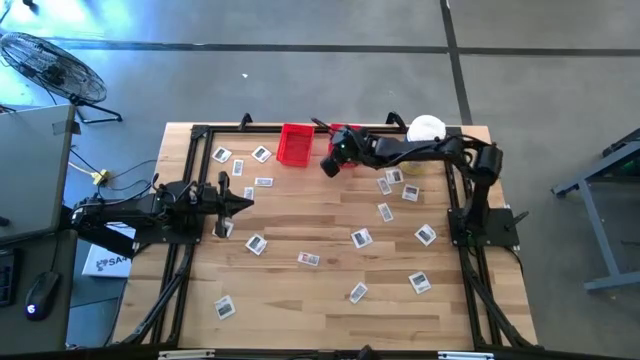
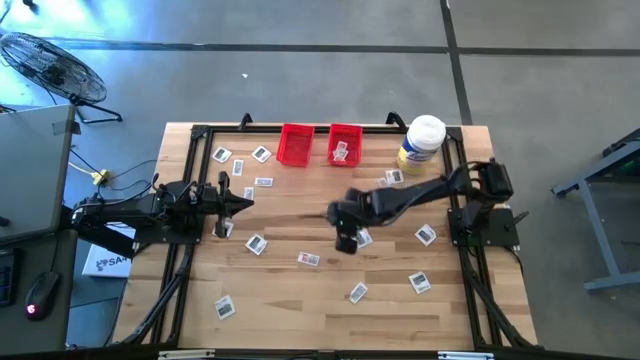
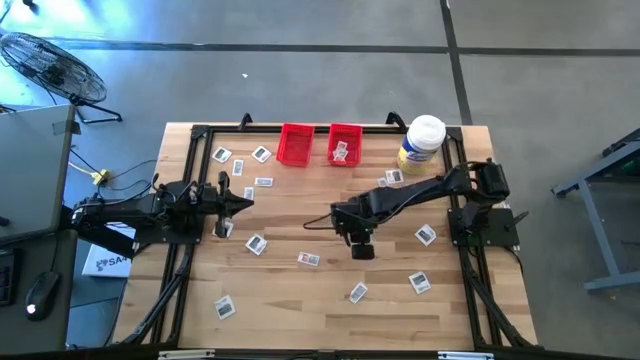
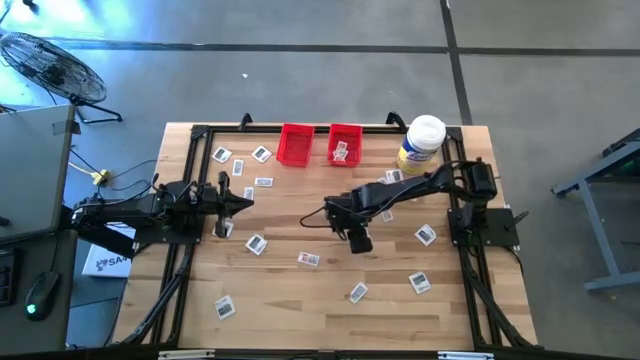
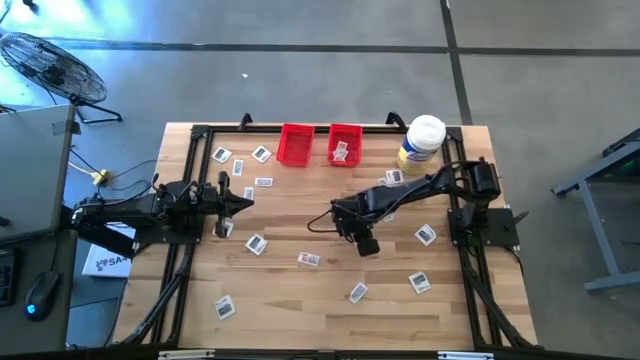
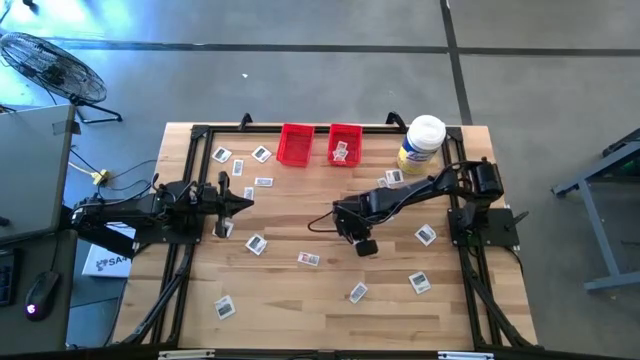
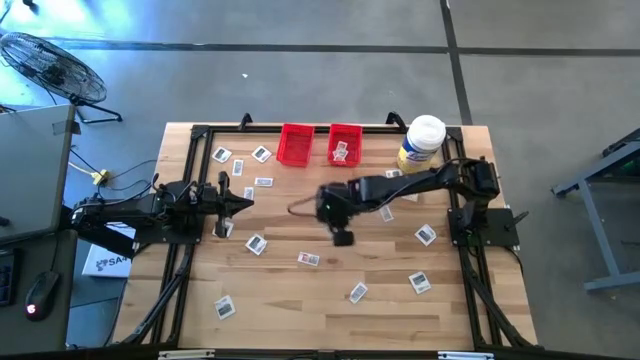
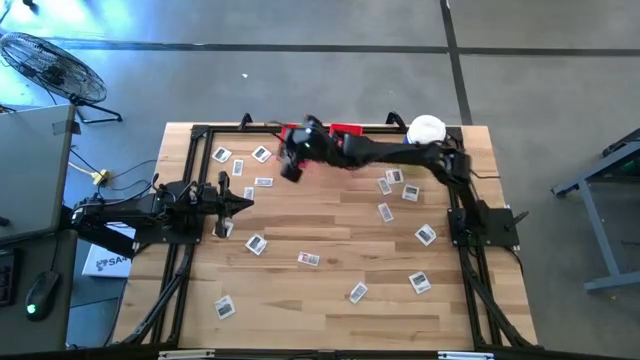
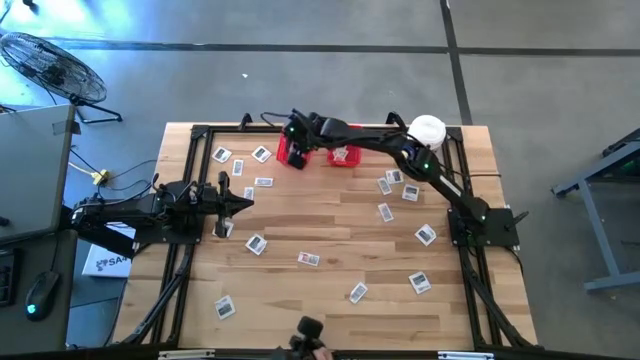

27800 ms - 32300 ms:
Task: Pick & Place First Aid Supplies
Put the towelette pack into the left red bin

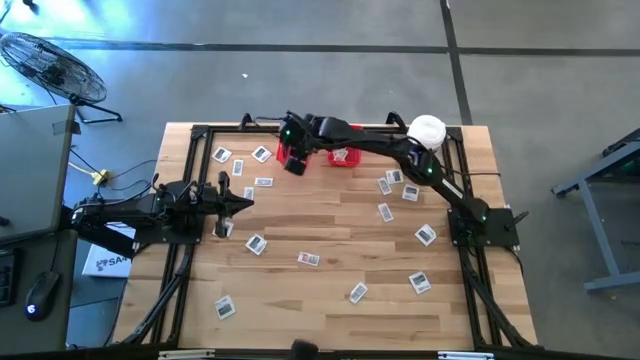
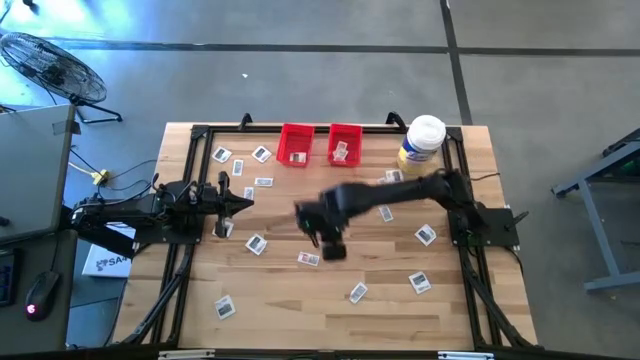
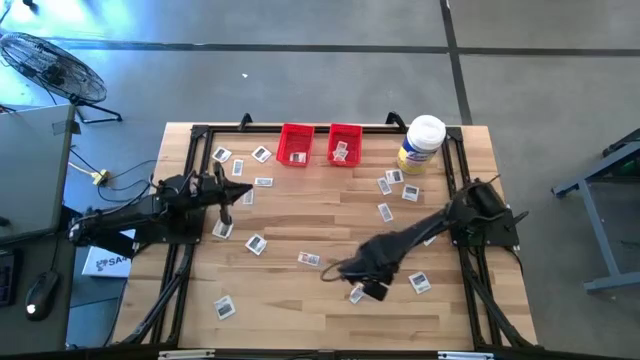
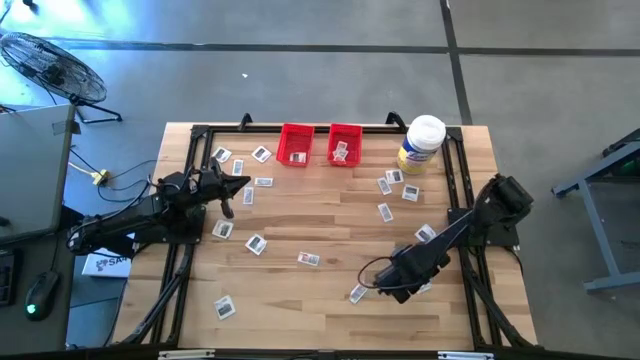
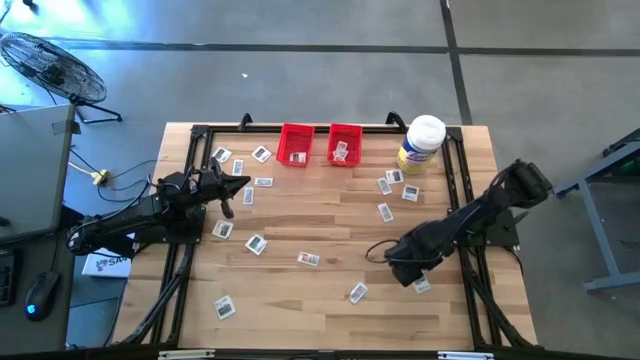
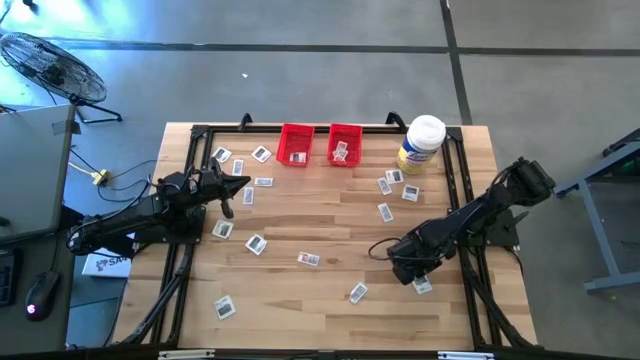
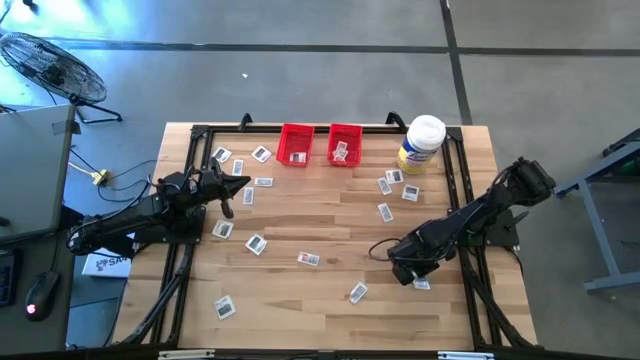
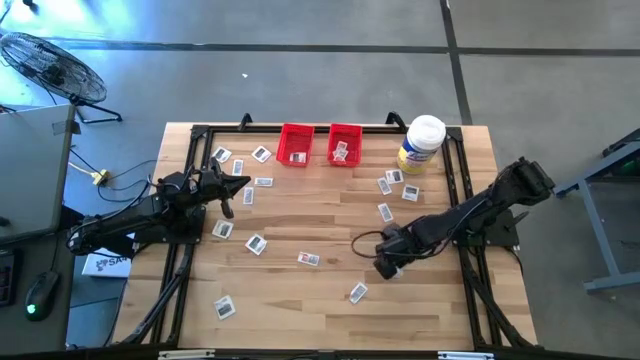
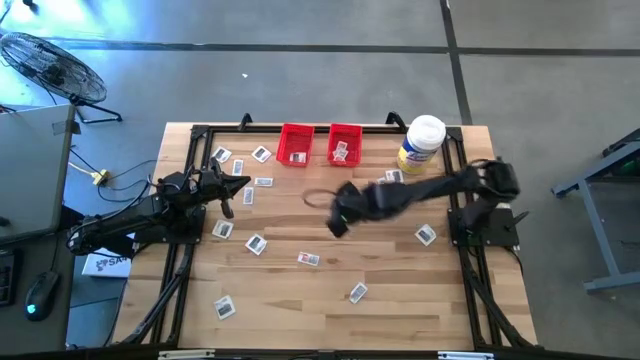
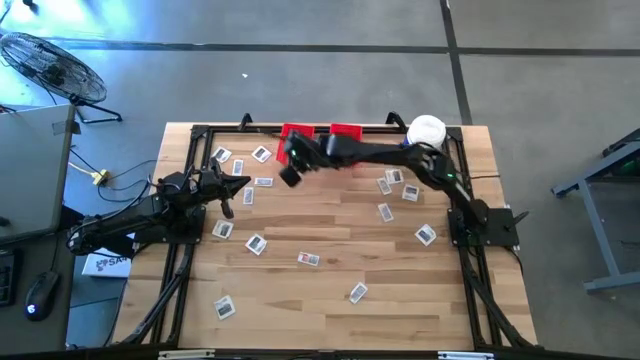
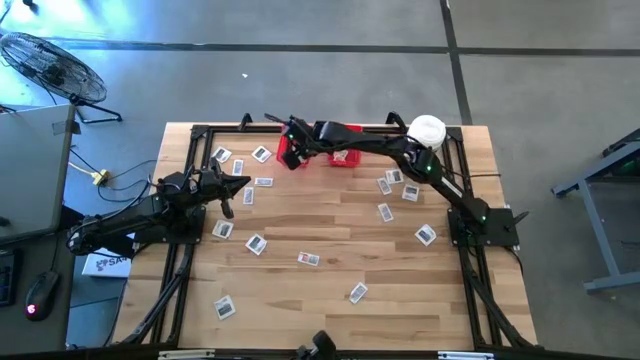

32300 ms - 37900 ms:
Put the towelette pack into the left red bin

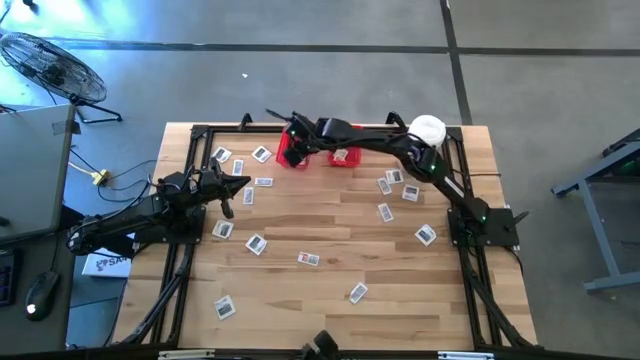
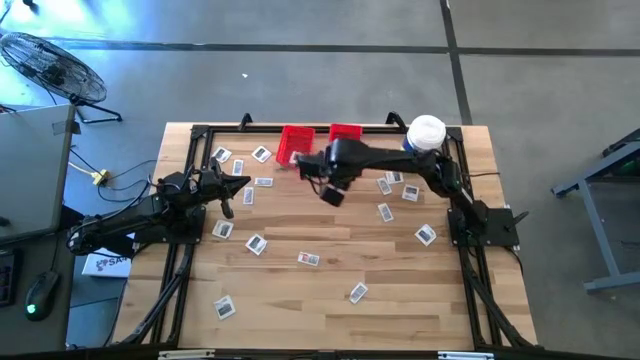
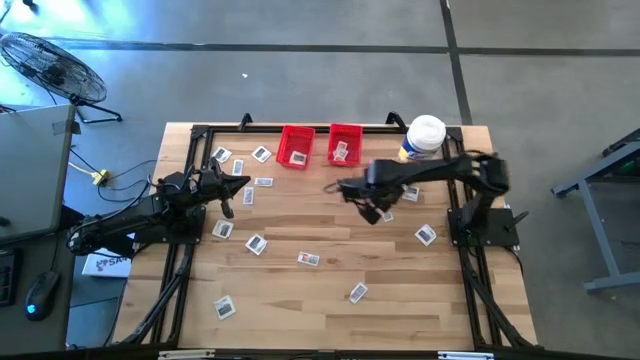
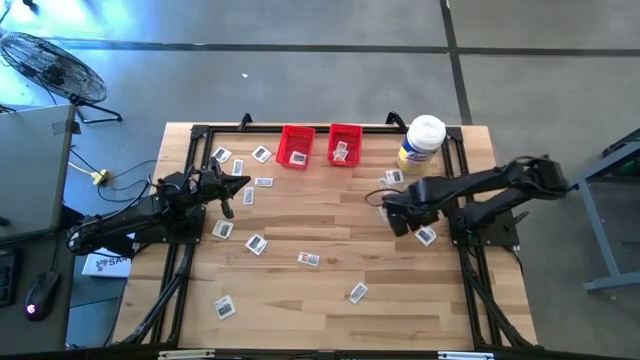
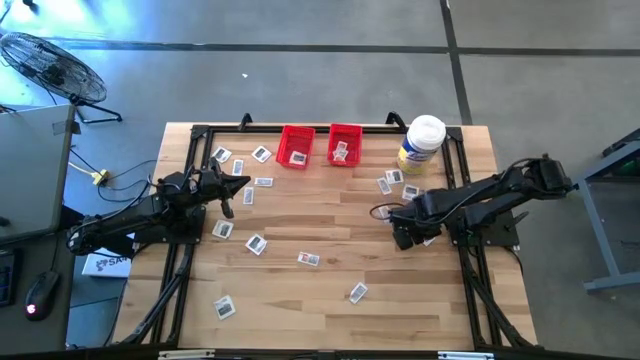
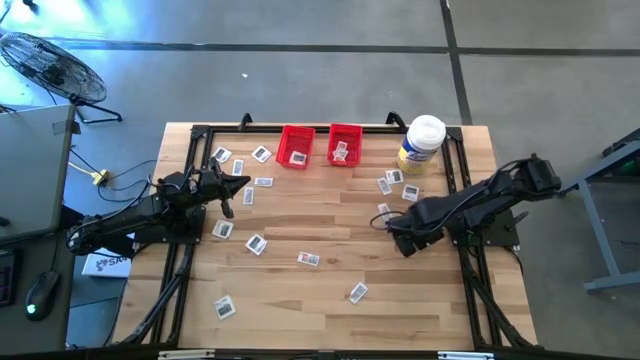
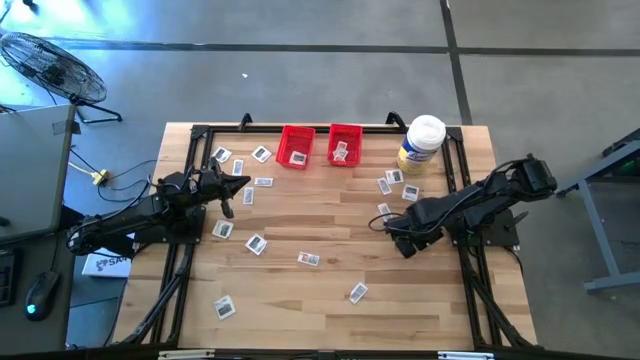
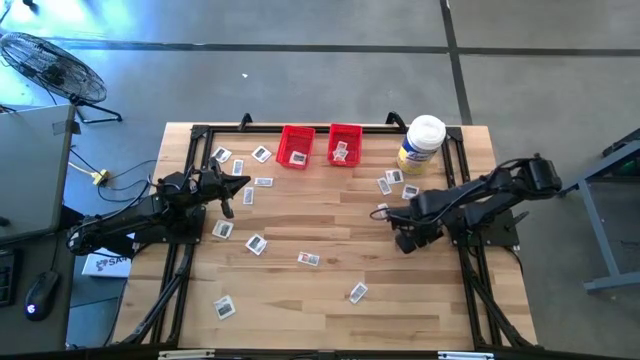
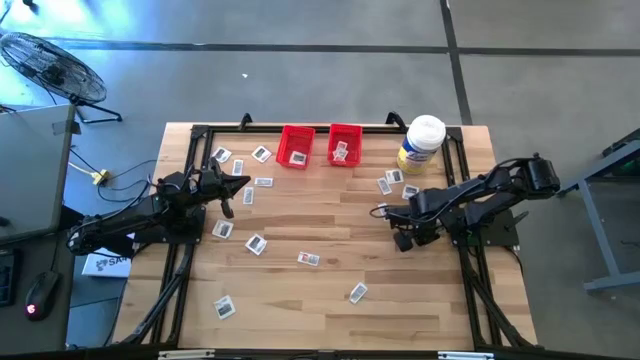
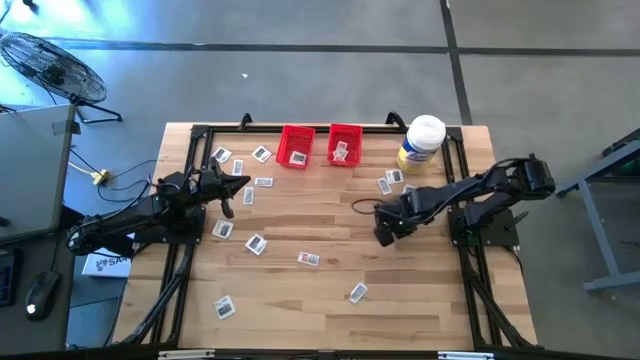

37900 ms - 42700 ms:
Put the towelette pack into the left red bin

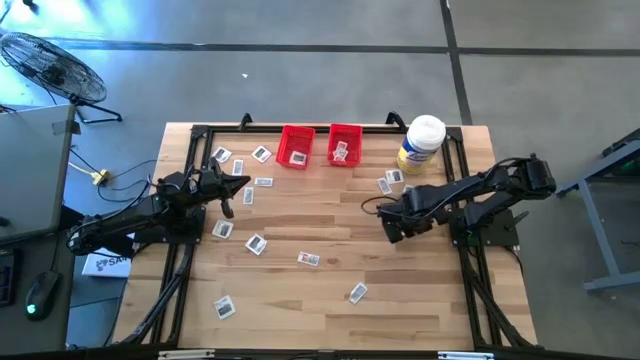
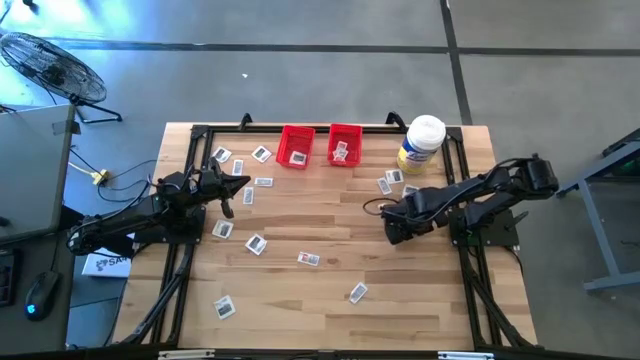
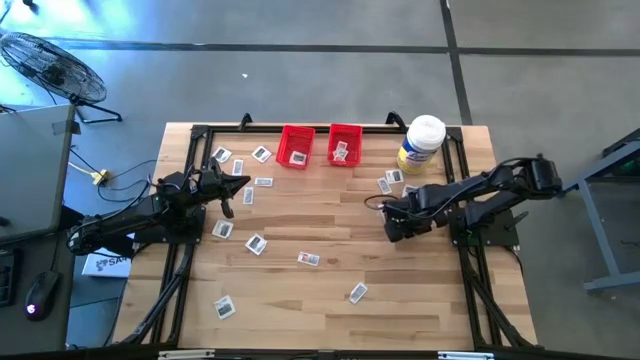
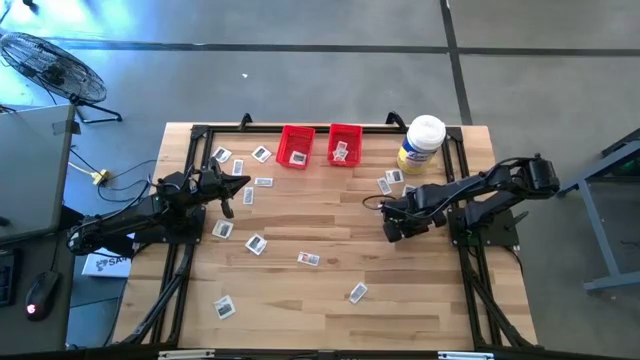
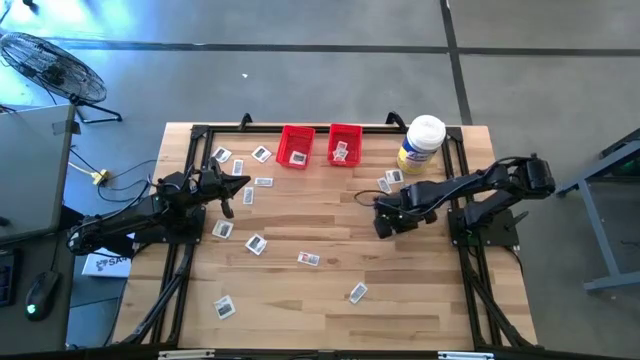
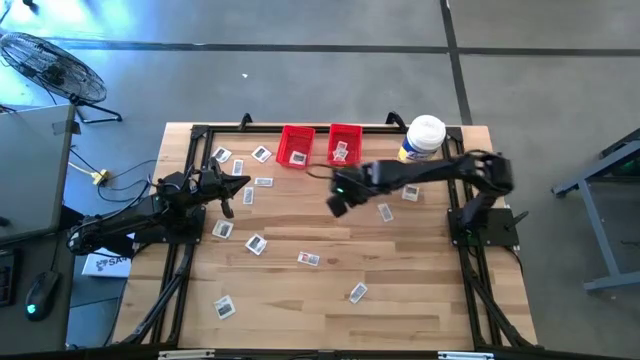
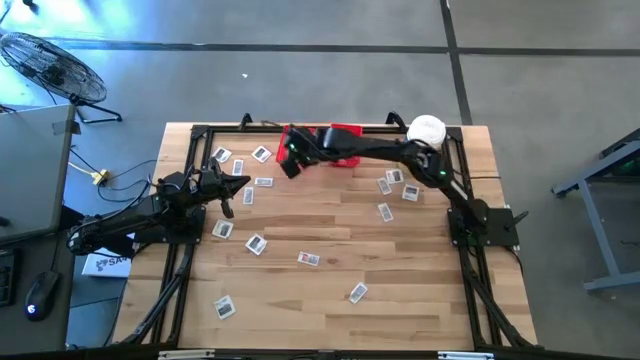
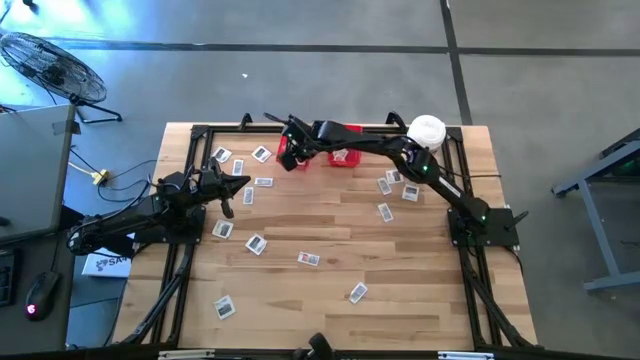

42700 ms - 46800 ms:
Put the towelette pack into the left red bin

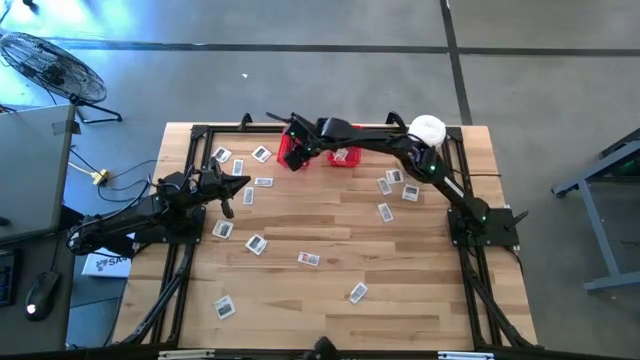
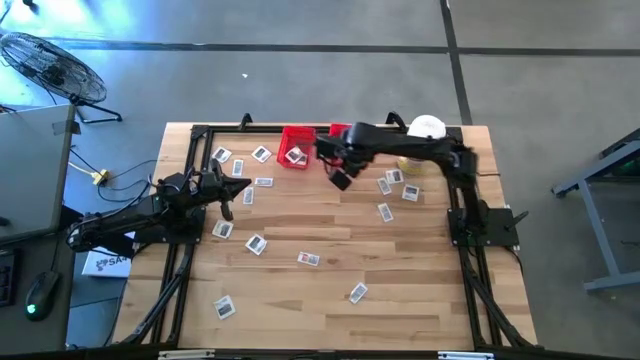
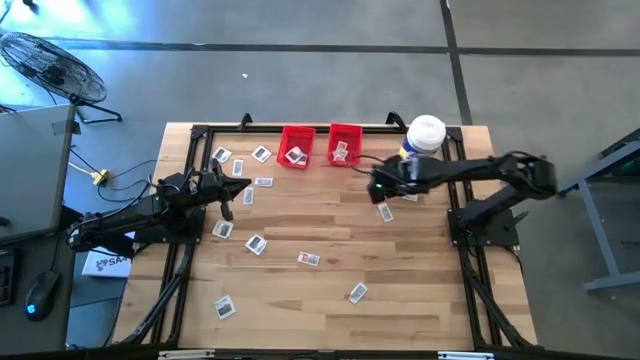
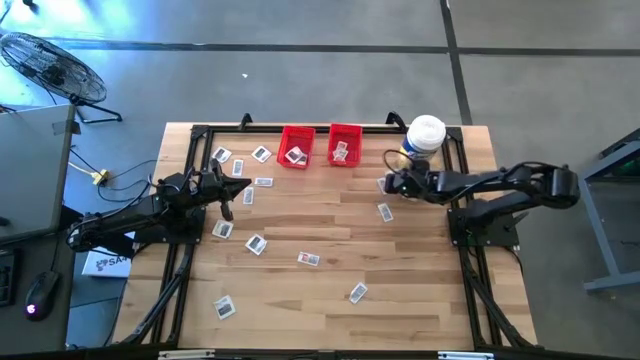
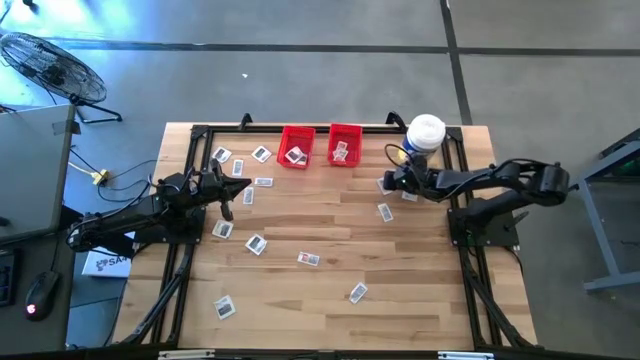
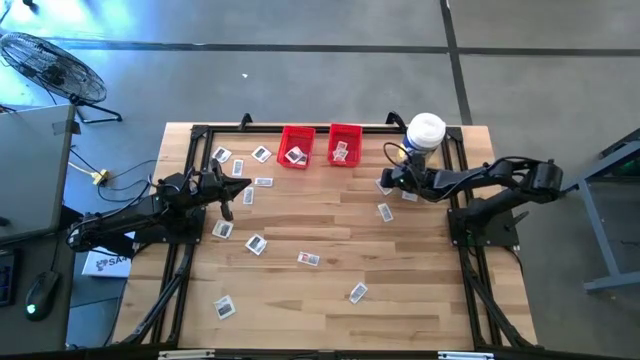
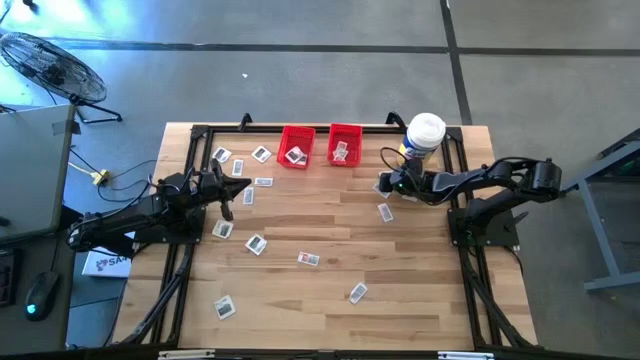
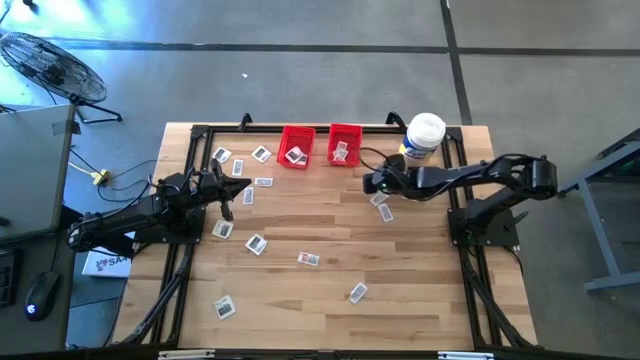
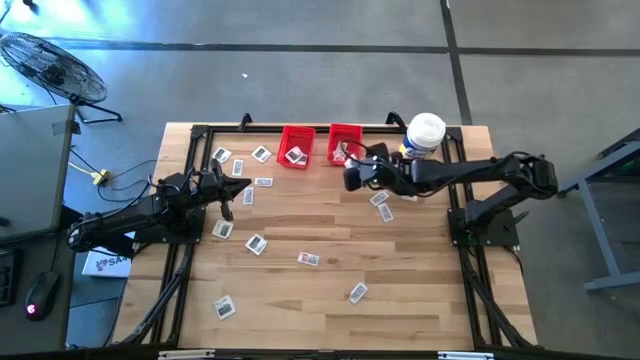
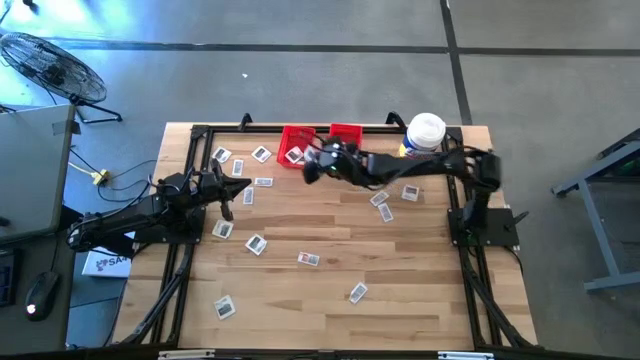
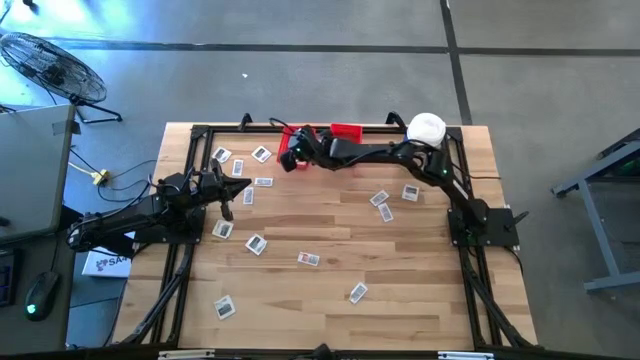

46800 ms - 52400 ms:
Put the towelette pack into the left red bin
